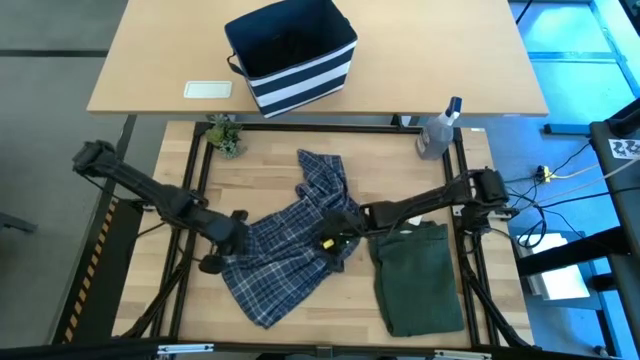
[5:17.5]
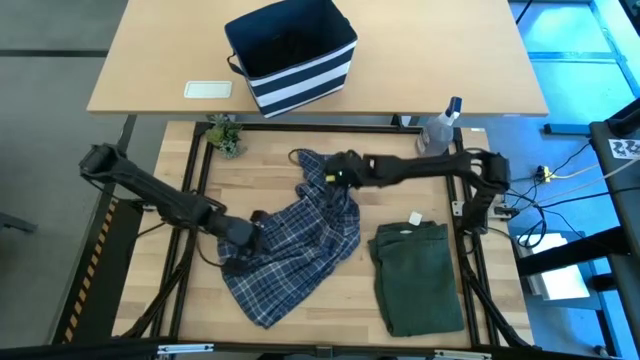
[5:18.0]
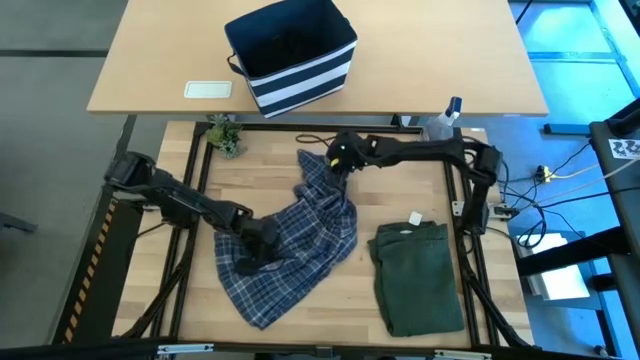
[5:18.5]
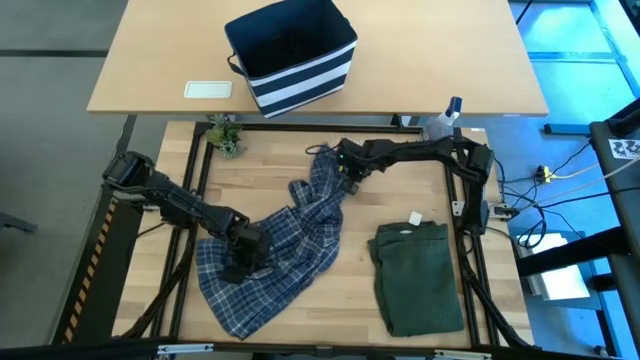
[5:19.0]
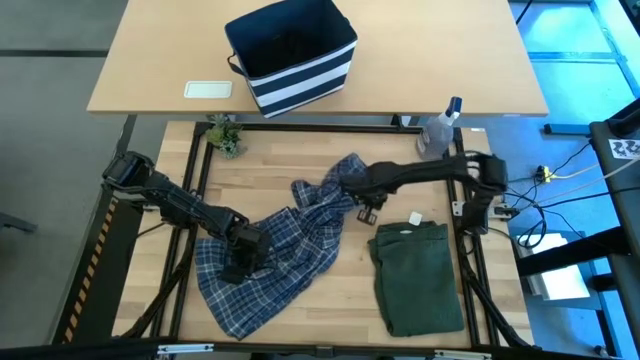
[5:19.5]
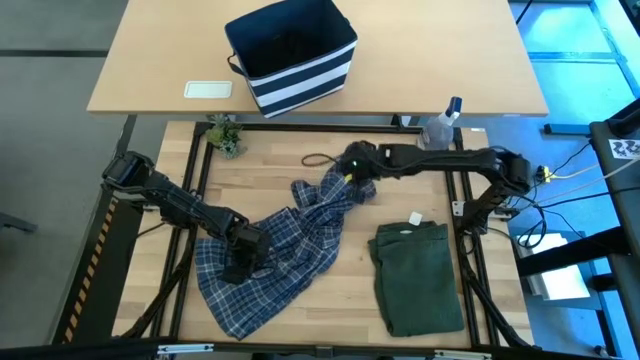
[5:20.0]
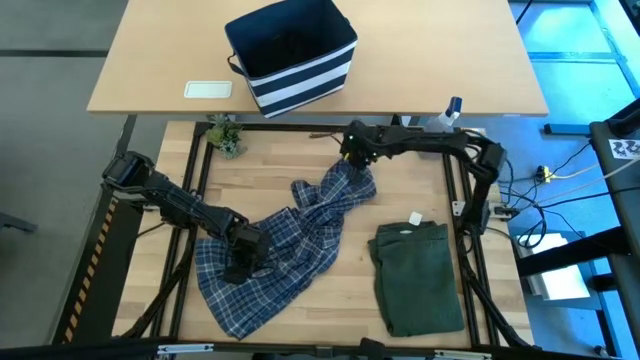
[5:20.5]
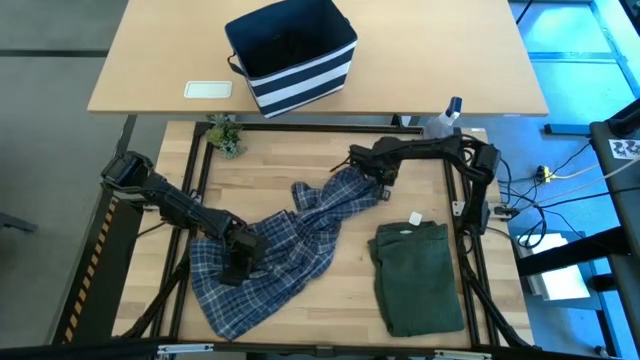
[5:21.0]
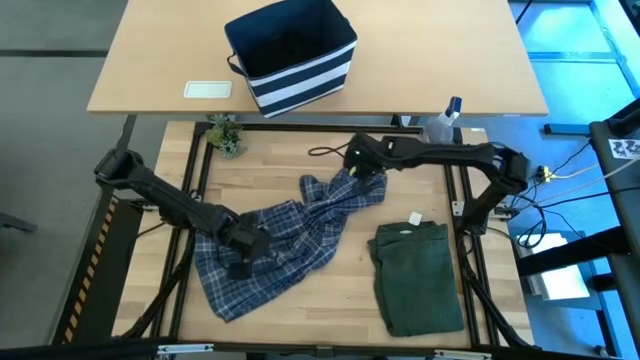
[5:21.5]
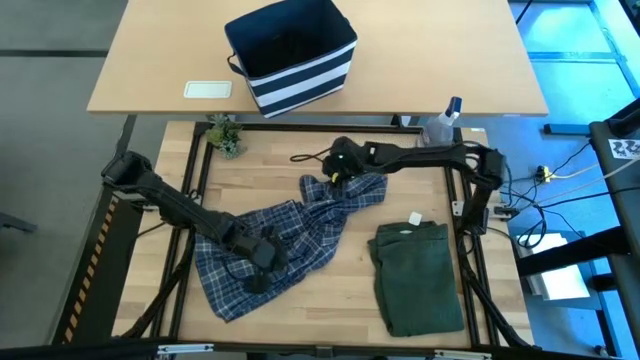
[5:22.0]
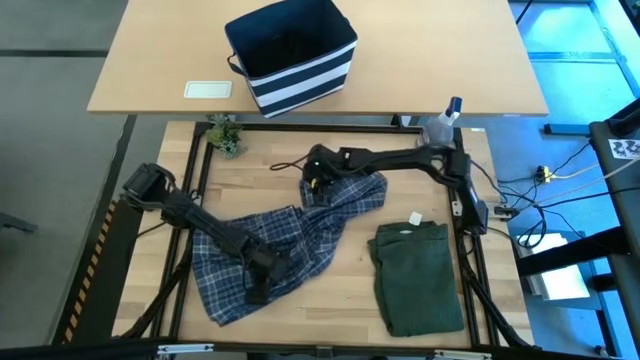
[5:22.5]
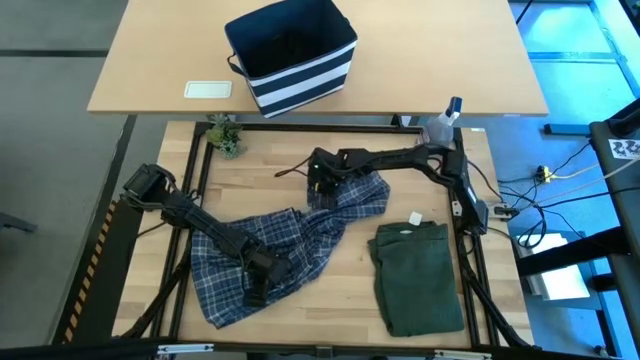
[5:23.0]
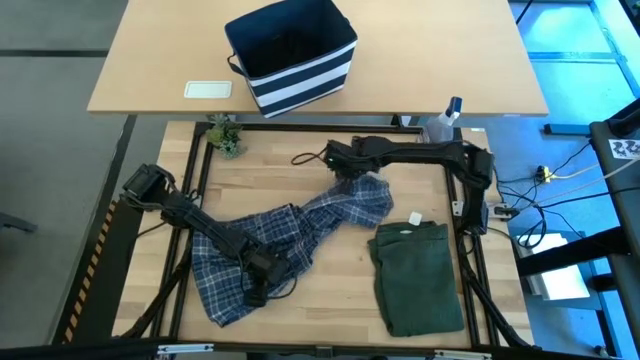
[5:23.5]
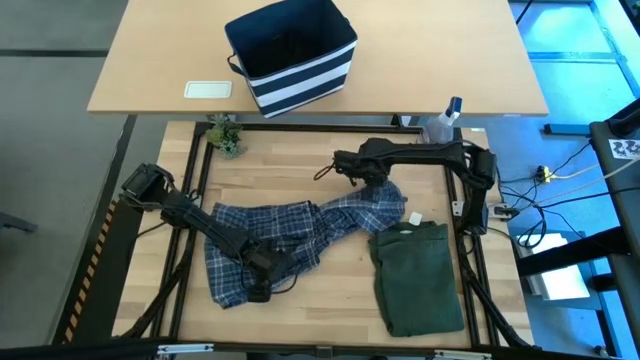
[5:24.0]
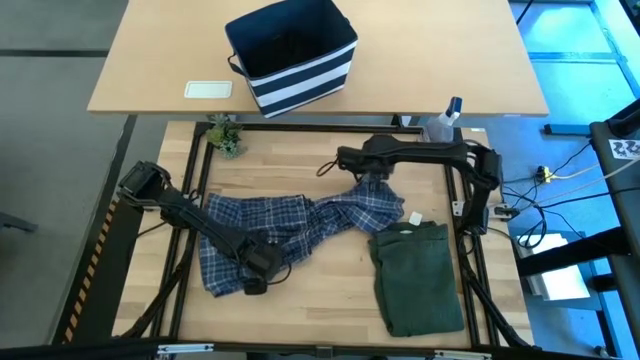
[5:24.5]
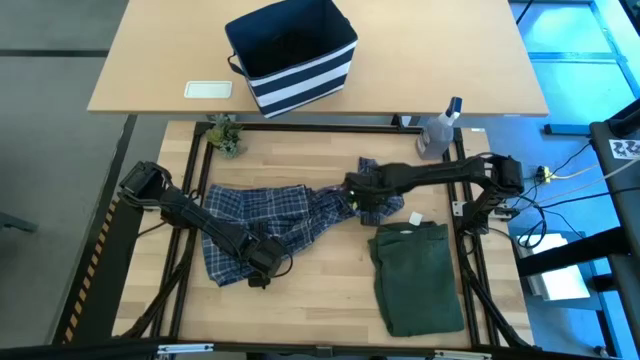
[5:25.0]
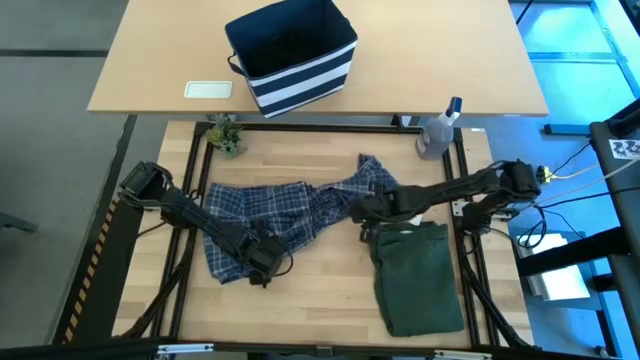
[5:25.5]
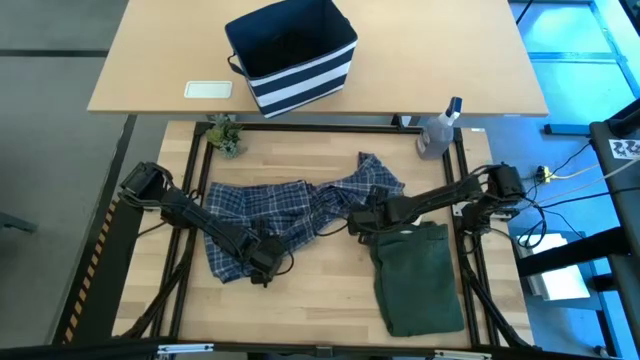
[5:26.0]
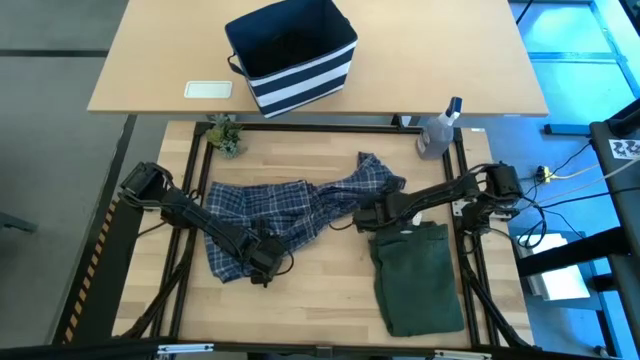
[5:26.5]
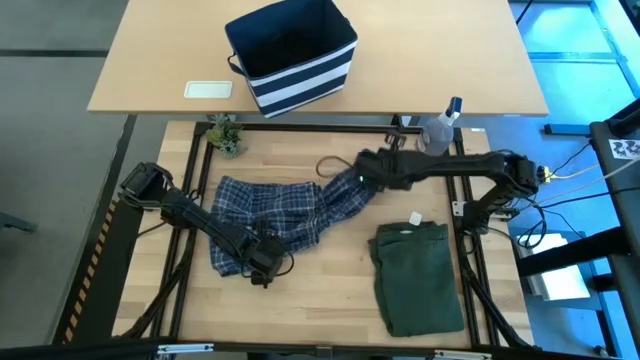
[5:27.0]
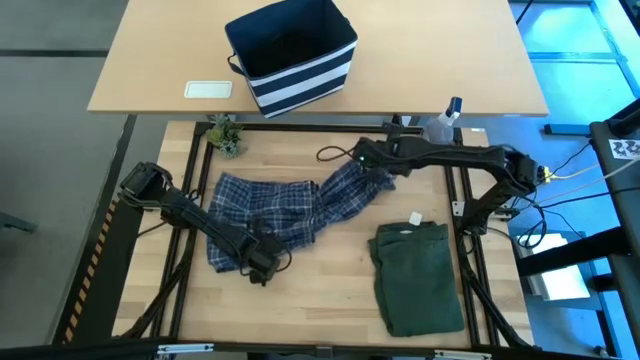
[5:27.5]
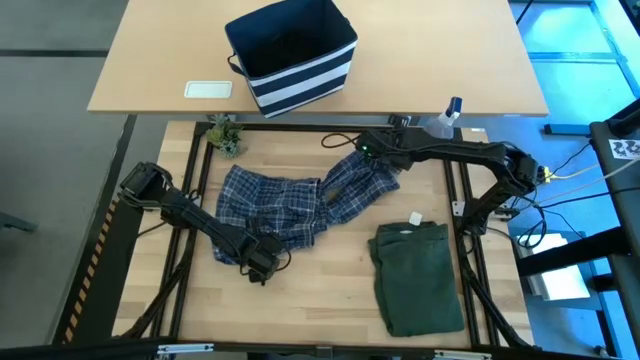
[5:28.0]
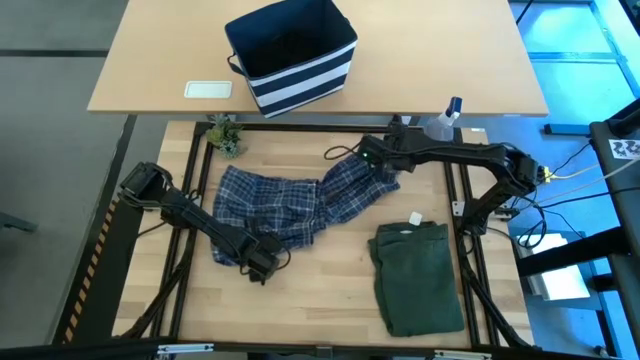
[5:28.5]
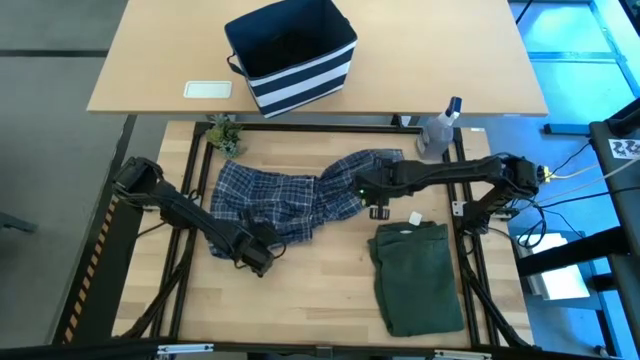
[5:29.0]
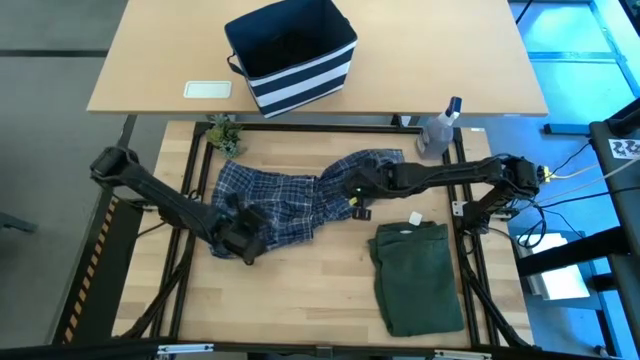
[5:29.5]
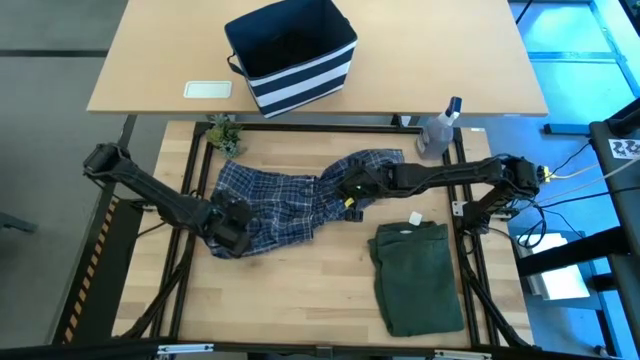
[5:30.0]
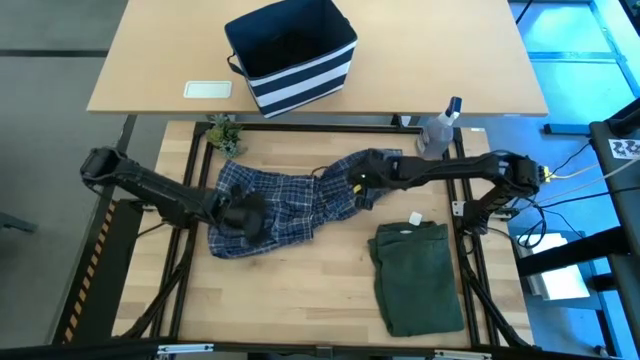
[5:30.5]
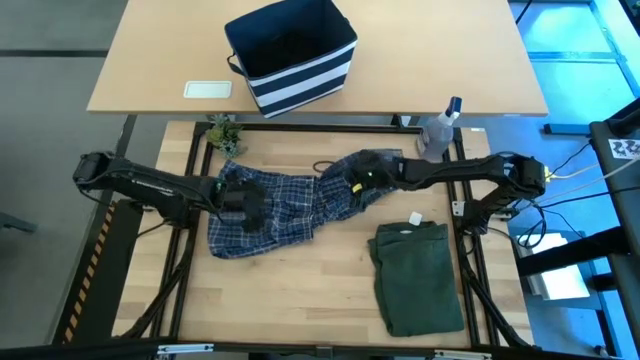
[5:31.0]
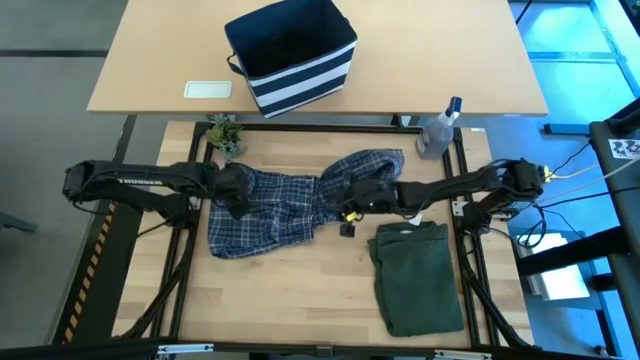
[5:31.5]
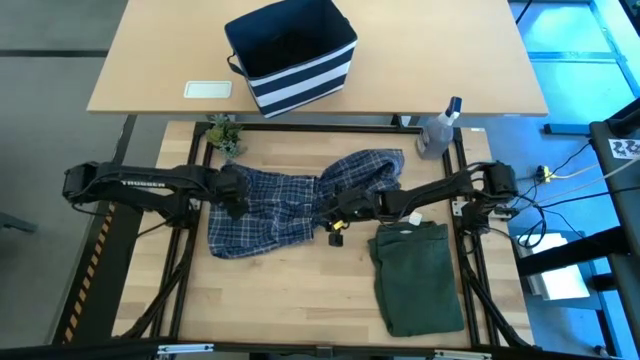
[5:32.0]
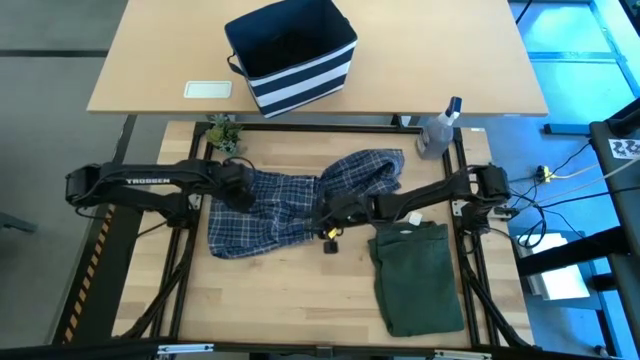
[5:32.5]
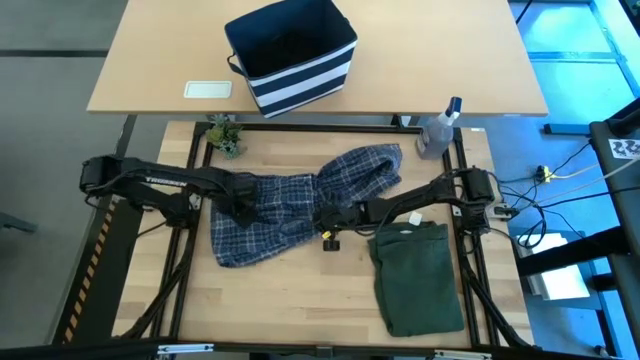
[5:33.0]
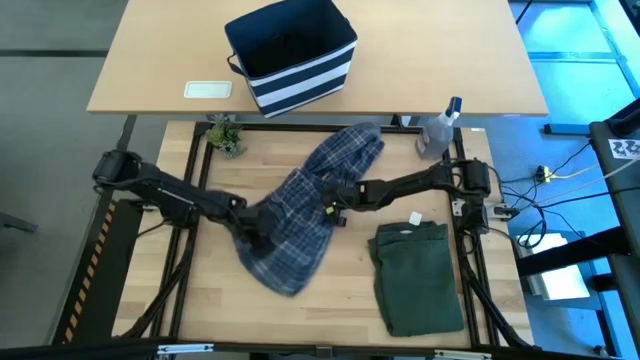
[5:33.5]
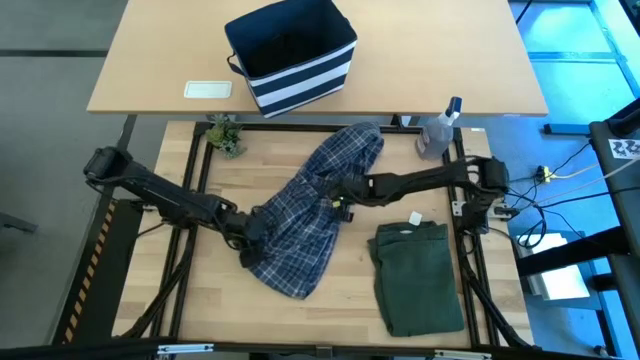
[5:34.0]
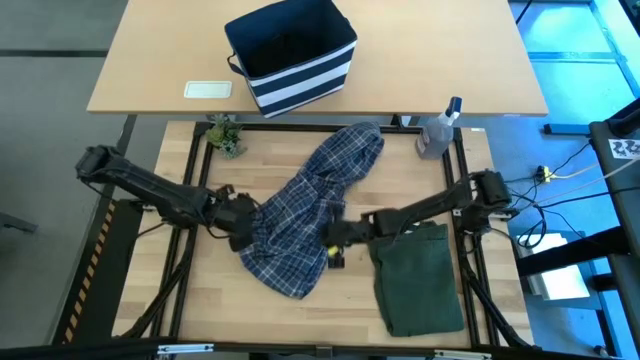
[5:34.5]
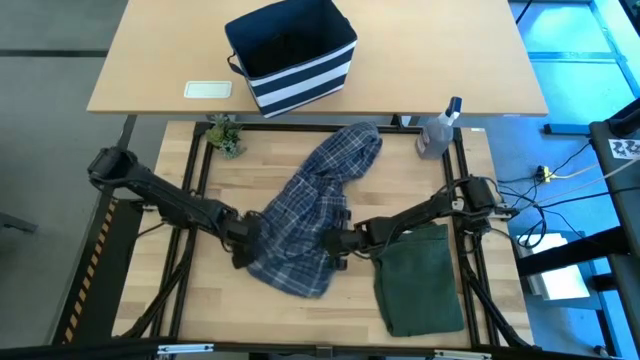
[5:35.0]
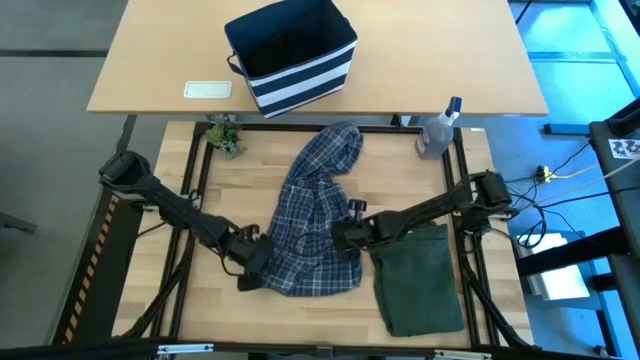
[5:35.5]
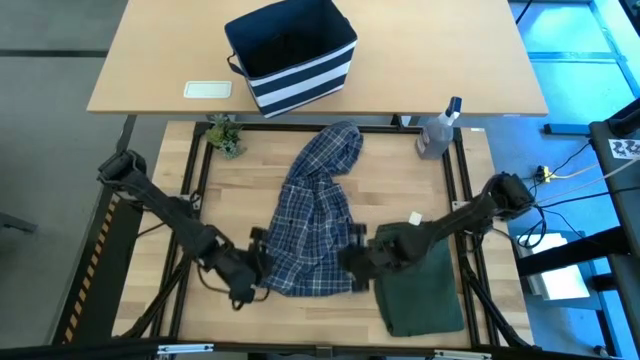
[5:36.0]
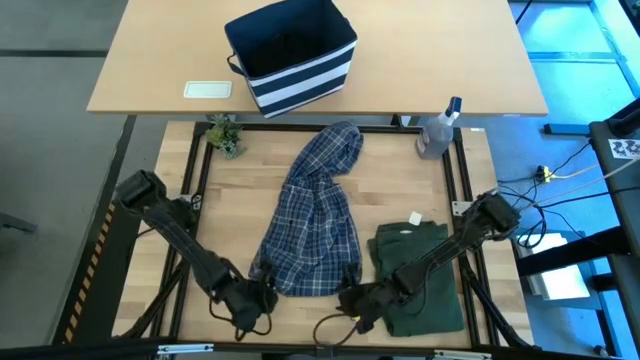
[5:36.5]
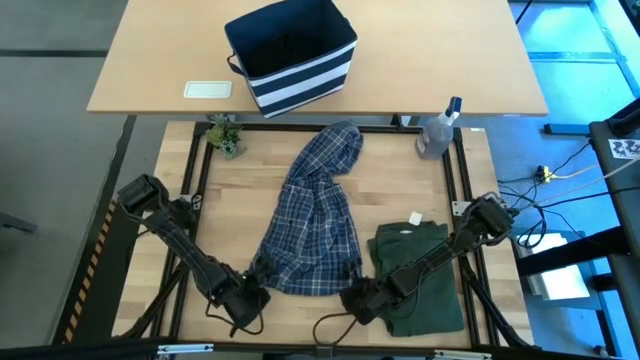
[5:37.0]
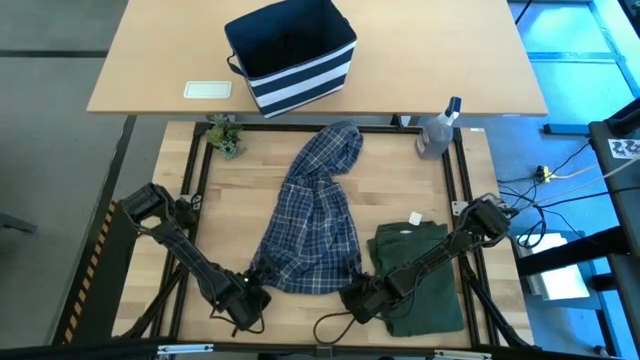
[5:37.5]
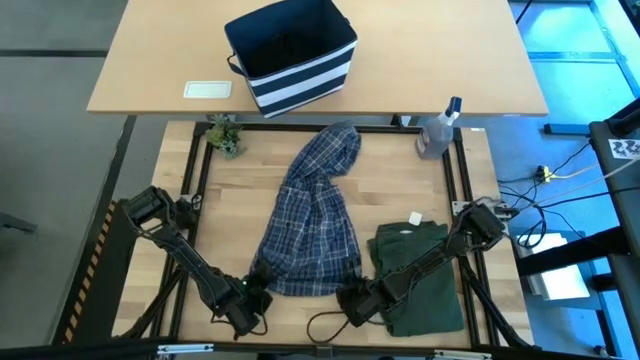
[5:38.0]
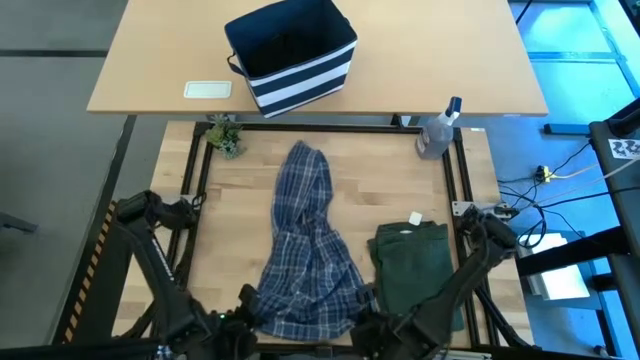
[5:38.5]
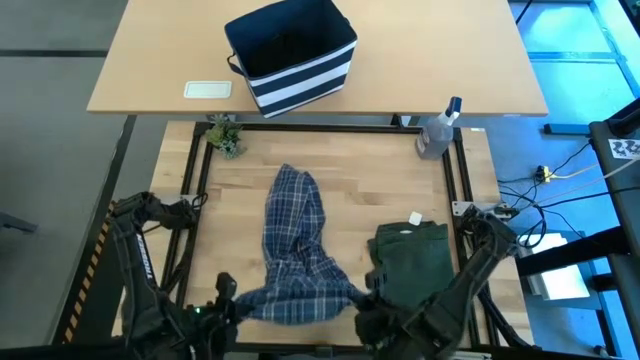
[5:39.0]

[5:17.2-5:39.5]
Task: Fold Laundry from Bin
Fold the blue checkered pants
